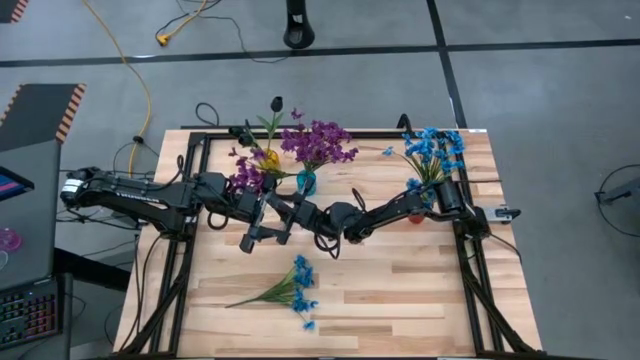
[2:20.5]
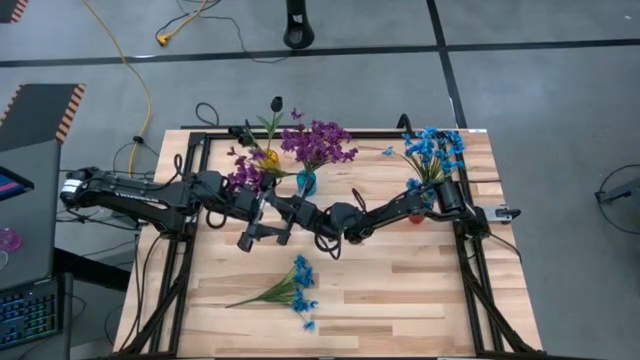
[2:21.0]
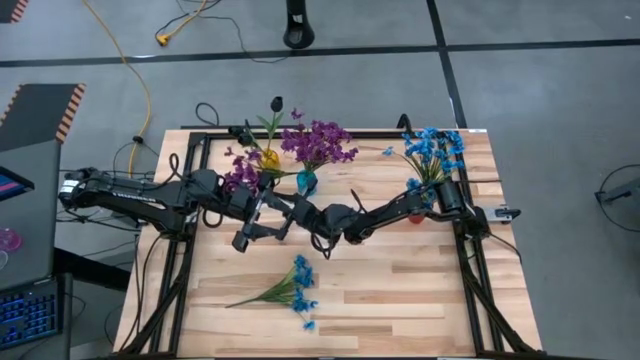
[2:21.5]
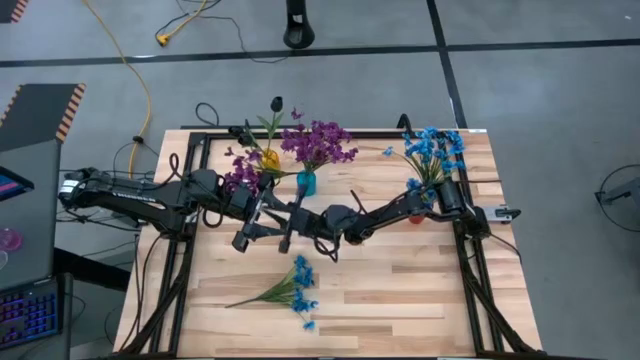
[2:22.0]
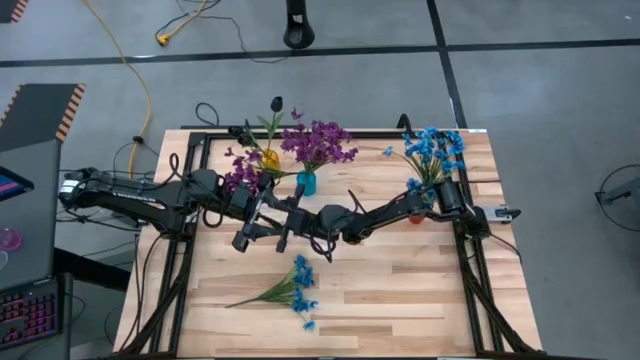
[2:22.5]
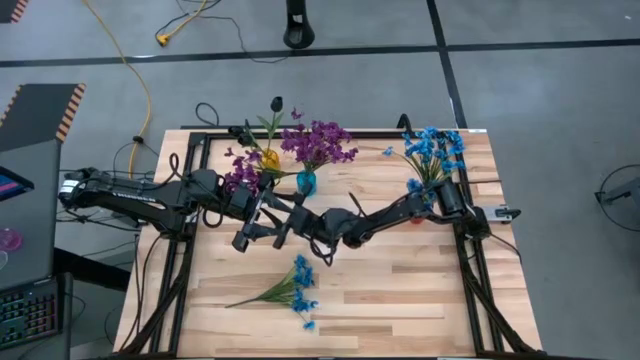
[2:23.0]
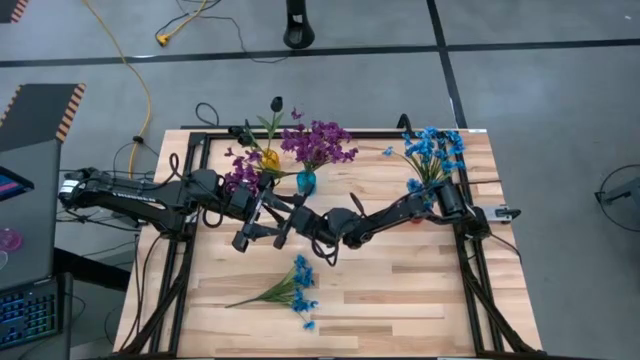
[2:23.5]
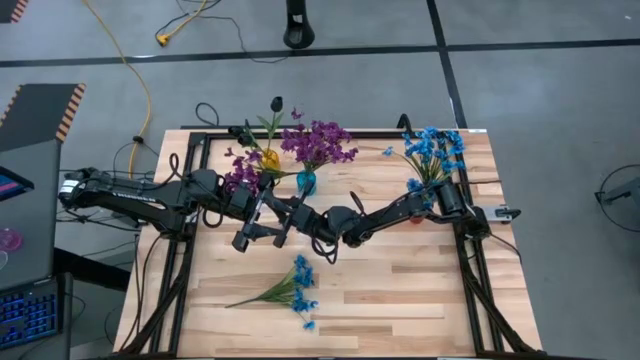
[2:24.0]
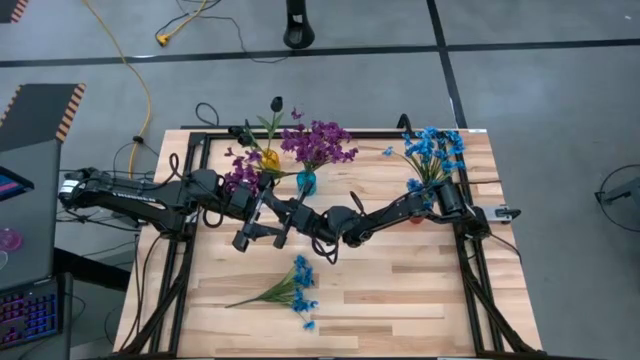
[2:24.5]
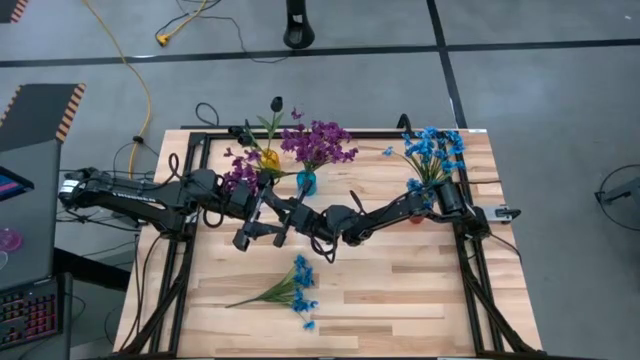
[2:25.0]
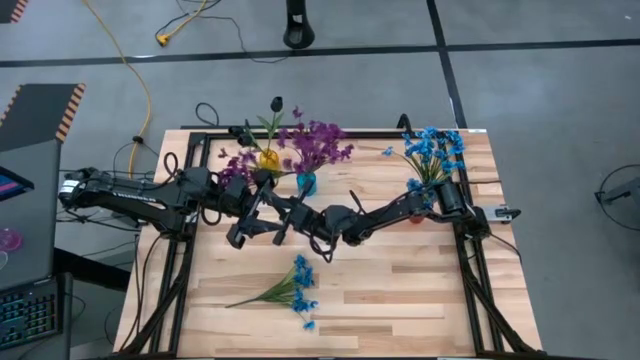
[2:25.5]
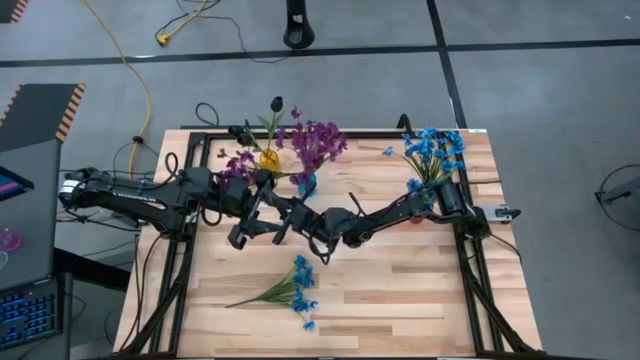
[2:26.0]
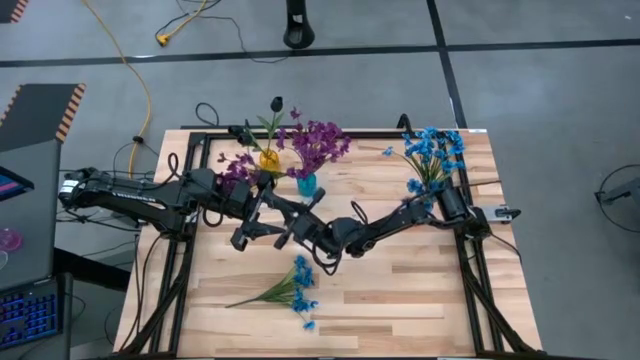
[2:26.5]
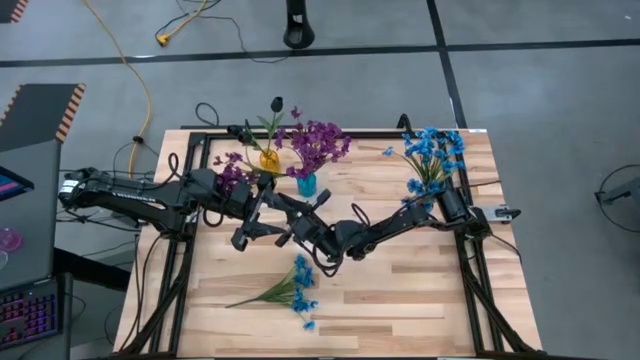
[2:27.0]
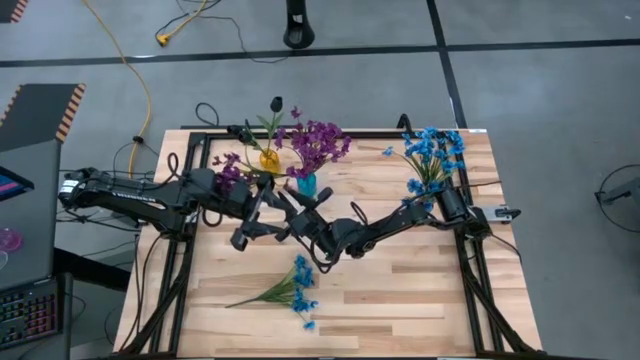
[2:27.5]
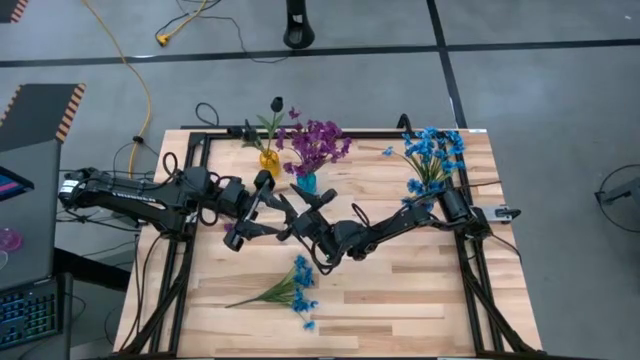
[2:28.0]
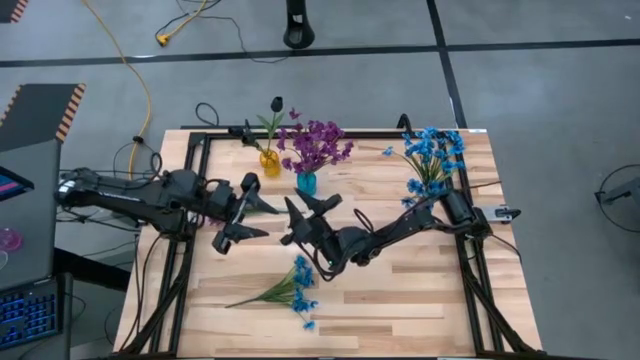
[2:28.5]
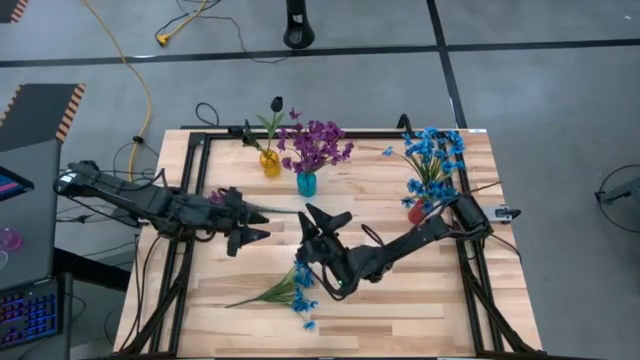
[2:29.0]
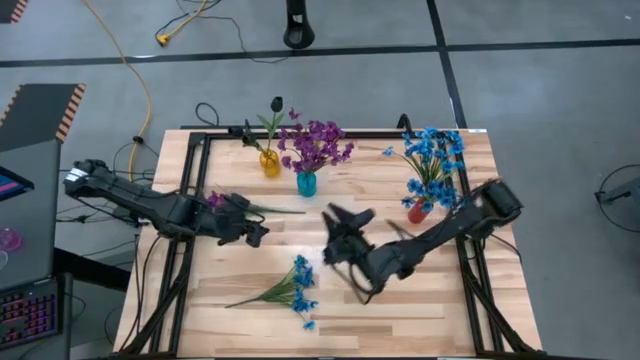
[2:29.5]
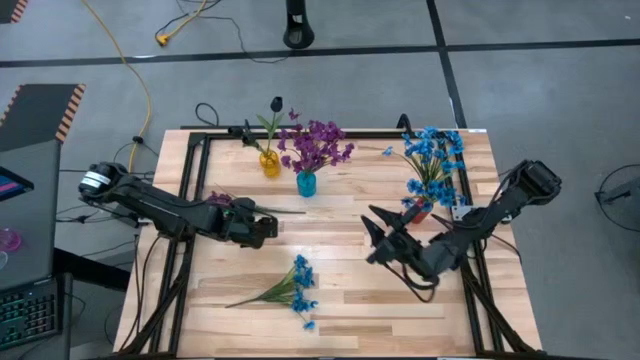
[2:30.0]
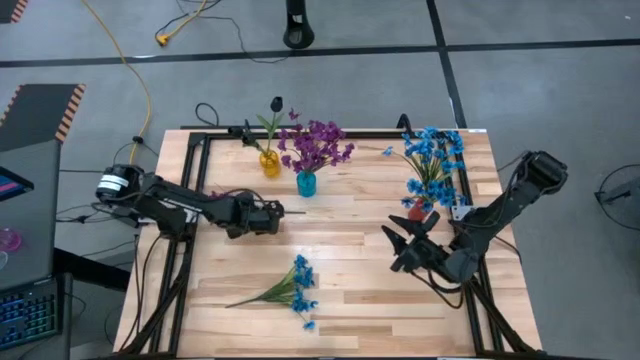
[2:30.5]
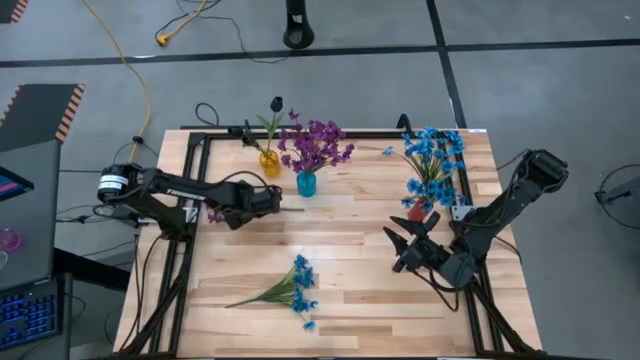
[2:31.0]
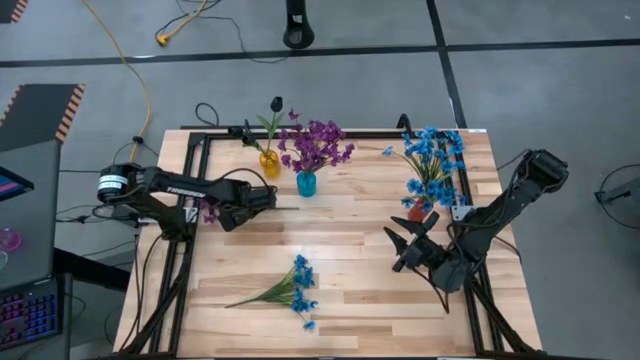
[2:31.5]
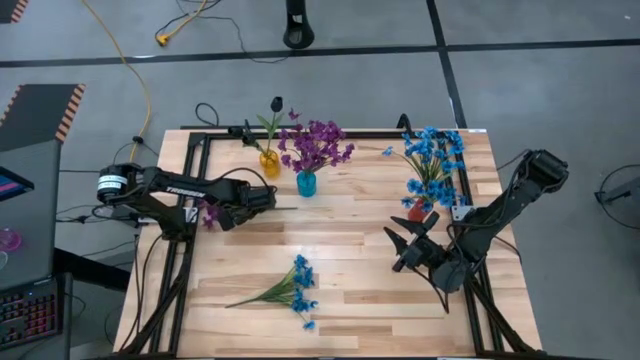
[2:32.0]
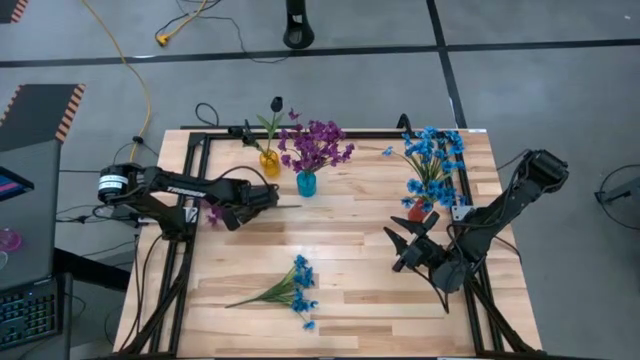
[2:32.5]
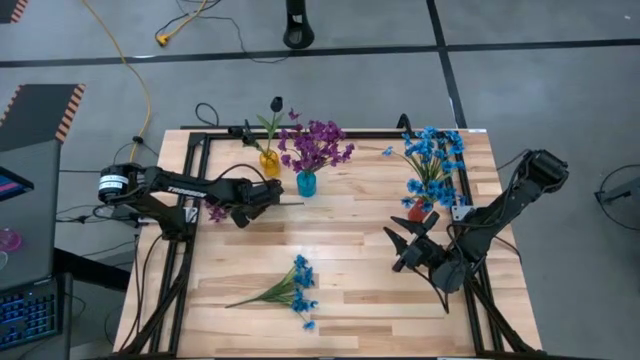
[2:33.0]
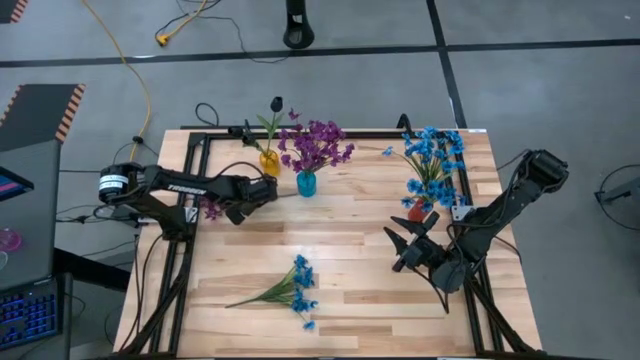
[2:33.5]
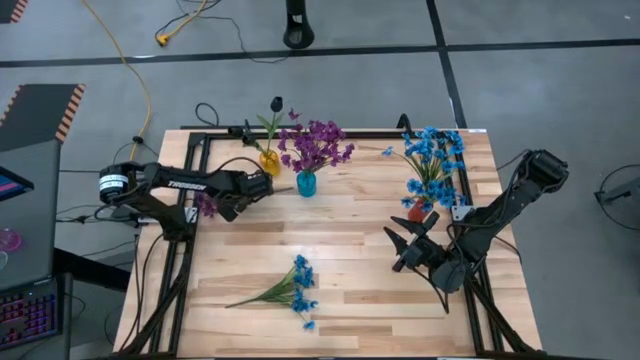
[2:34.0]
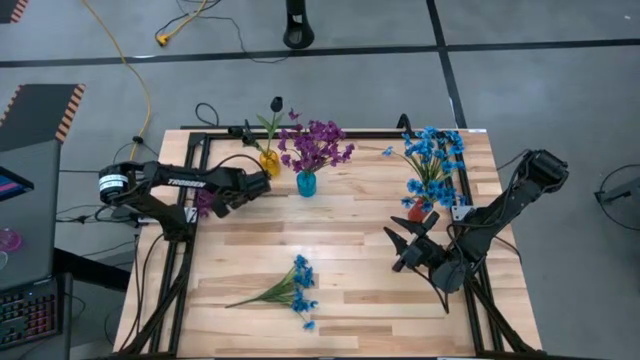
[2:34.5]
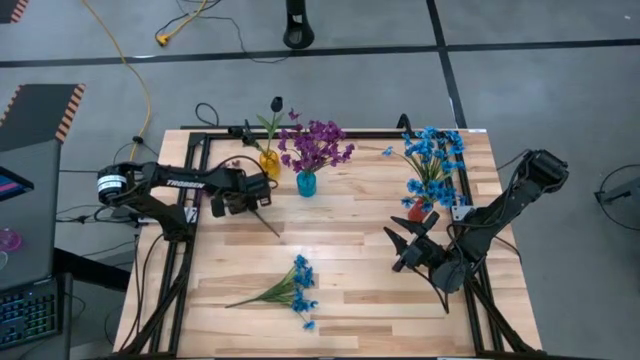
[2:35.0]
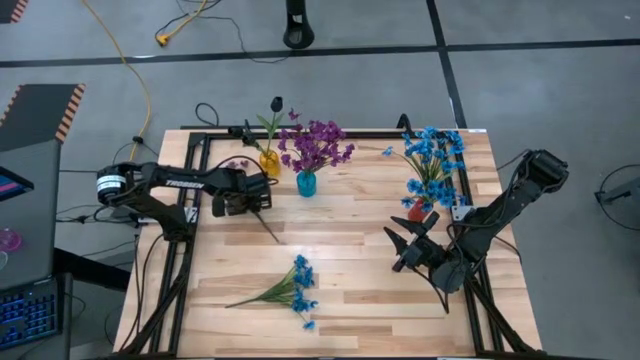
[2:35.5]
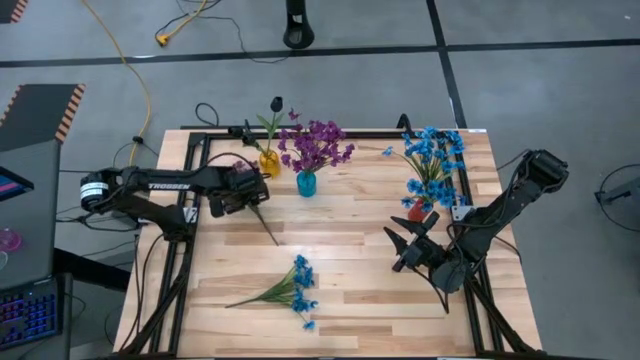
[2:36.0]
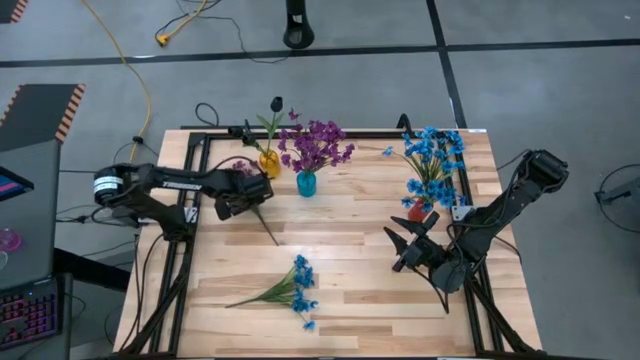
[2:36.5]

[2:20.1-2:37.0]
Task: Sort flowers into vase by color
Put the violet flower into the blue vase

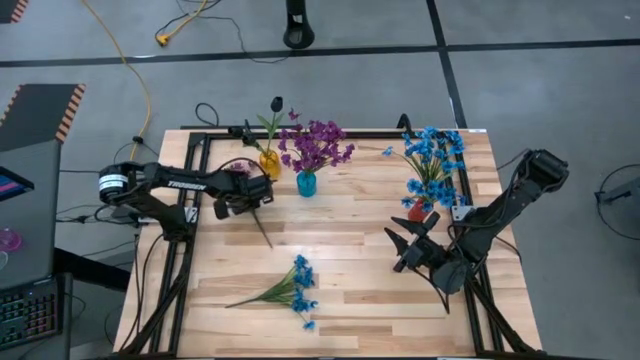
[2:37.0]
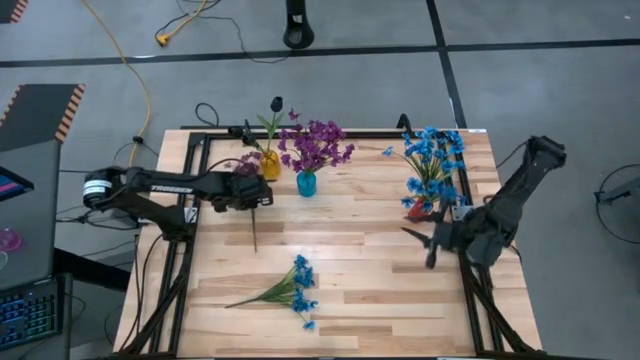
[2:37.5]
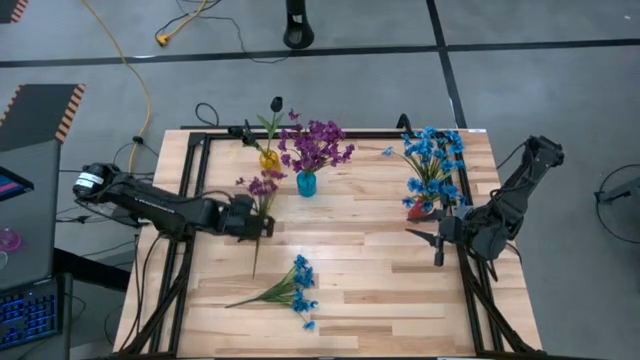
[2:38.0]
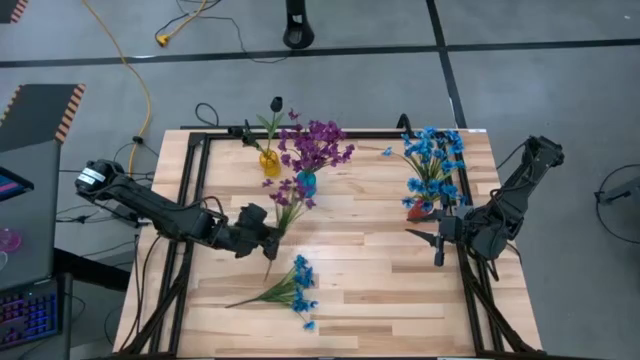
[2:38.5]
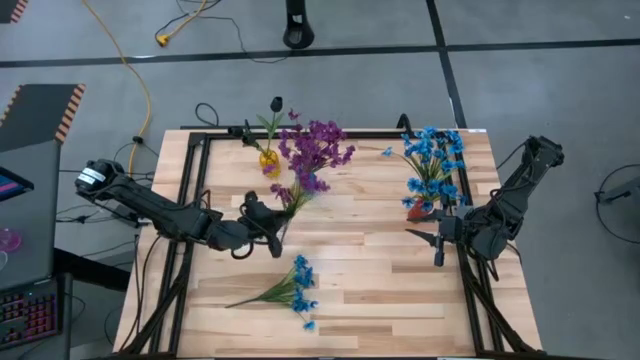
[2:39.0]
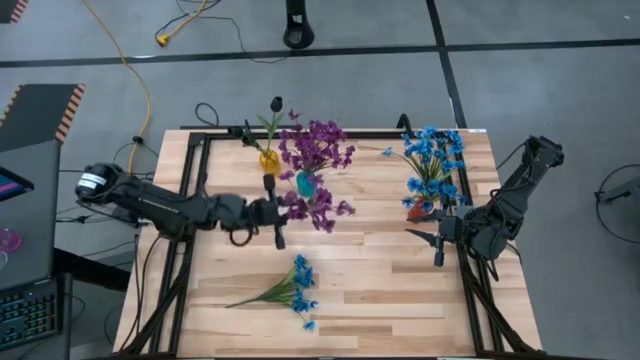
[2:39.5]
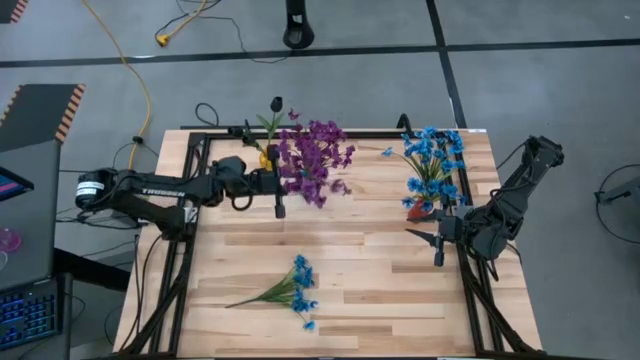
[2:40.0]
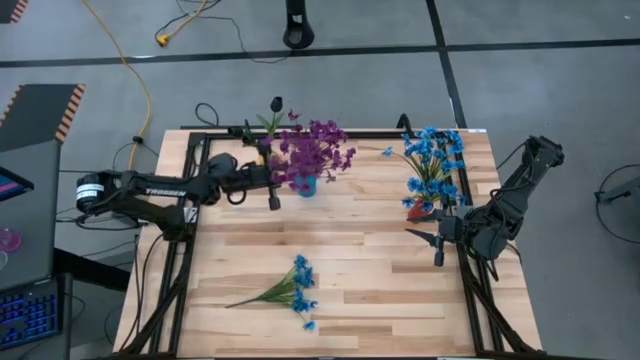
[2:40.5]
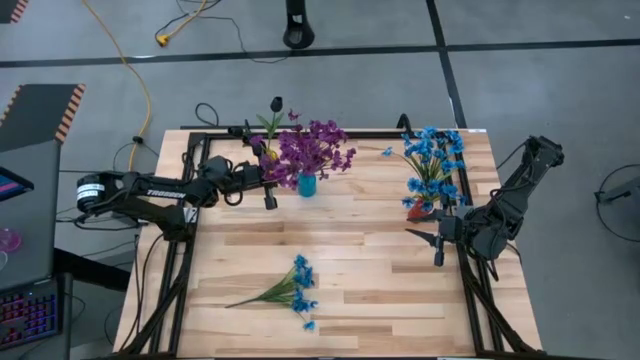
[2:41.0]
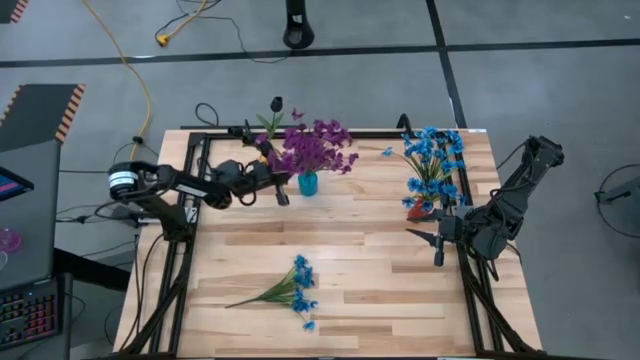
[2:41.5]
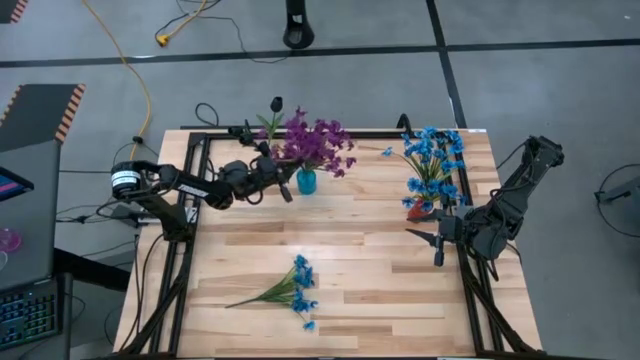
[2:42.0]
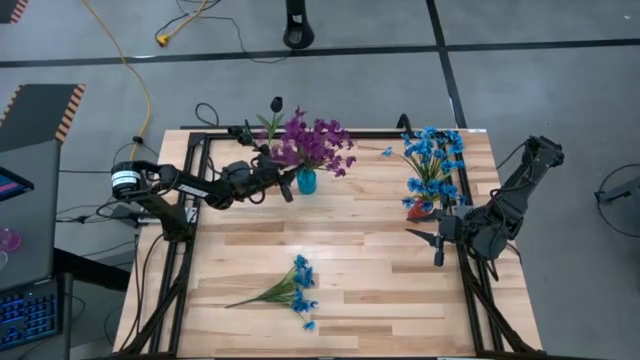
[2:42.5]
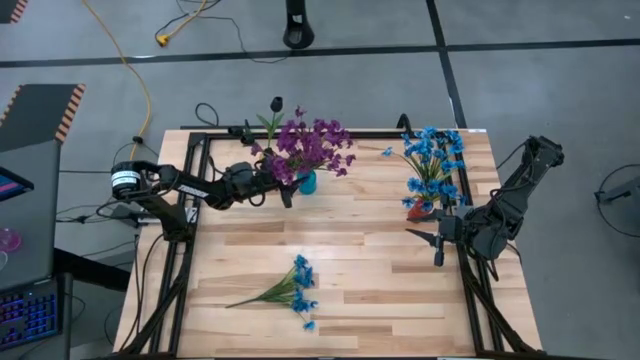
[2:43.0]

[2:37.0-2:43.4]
Put the violet flower into the blue vase
